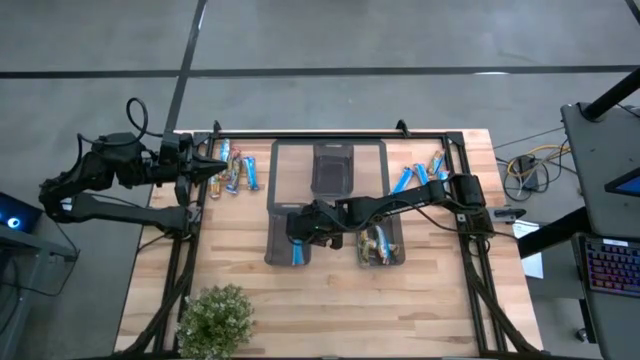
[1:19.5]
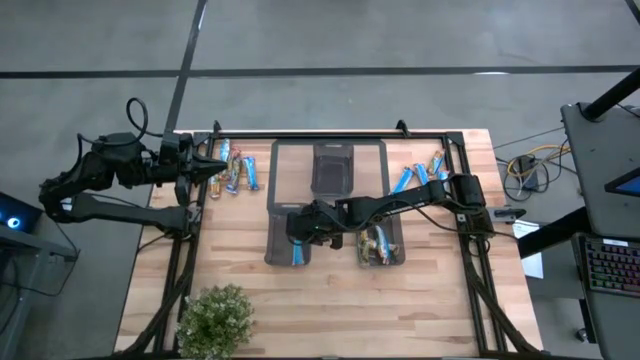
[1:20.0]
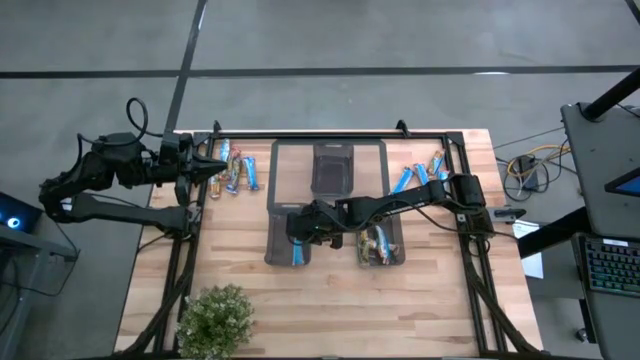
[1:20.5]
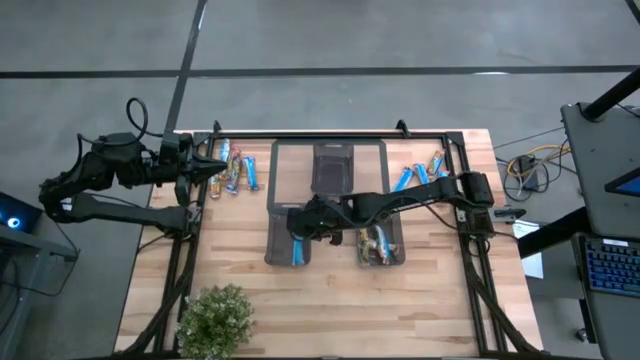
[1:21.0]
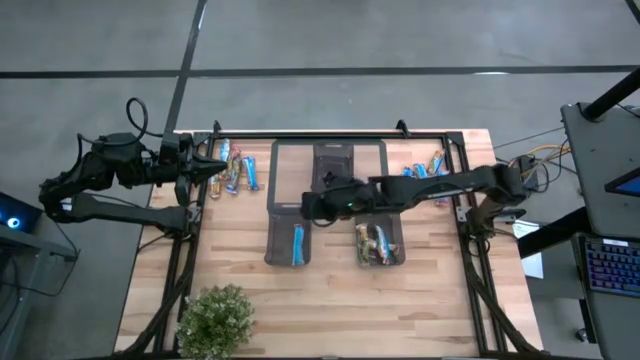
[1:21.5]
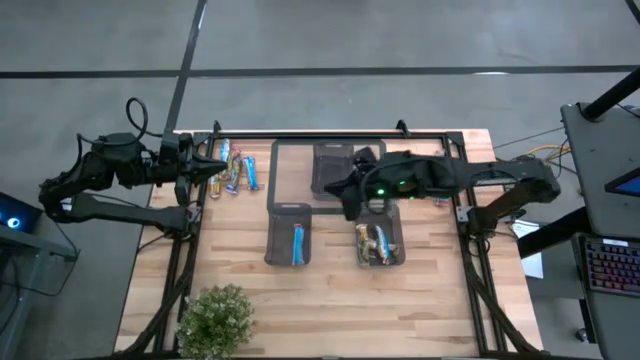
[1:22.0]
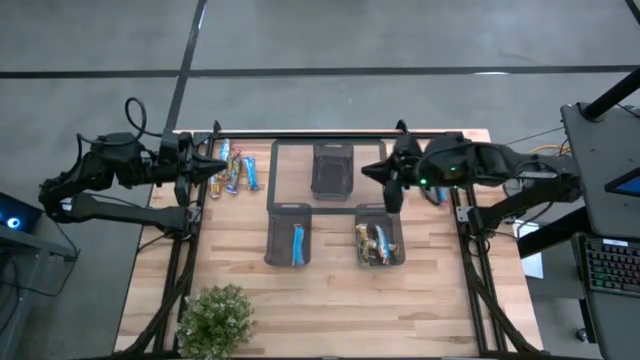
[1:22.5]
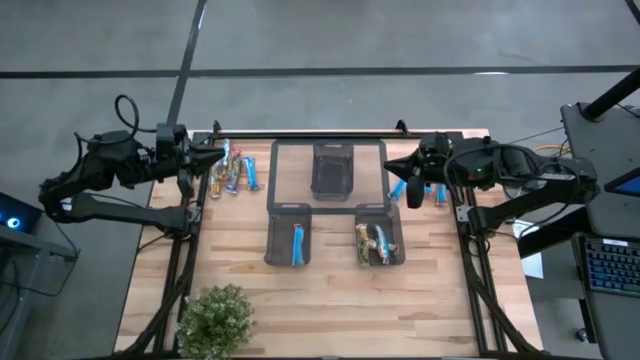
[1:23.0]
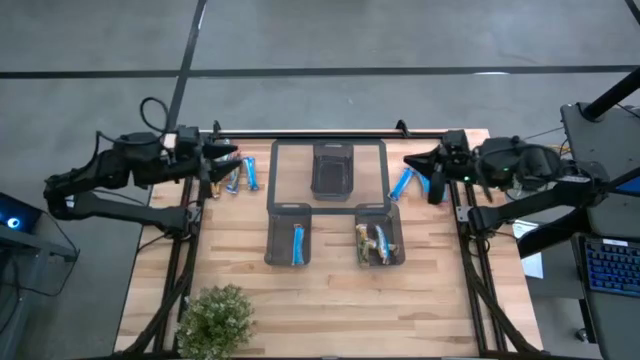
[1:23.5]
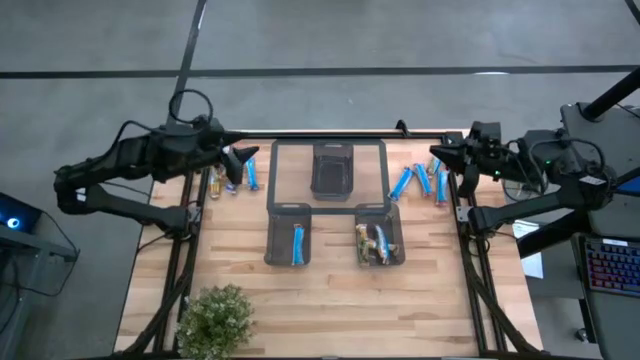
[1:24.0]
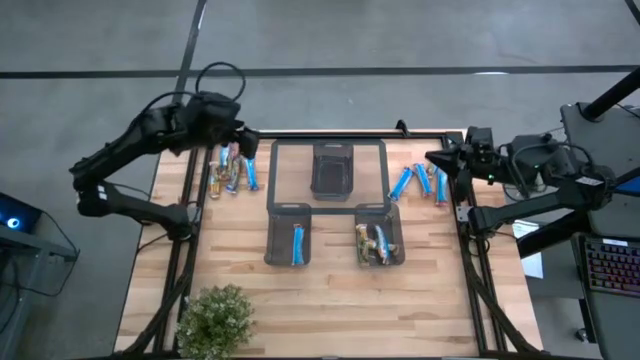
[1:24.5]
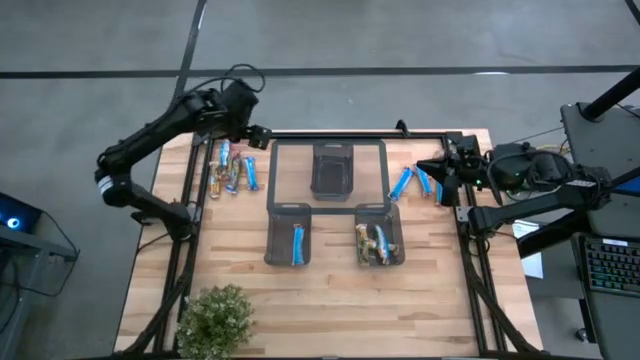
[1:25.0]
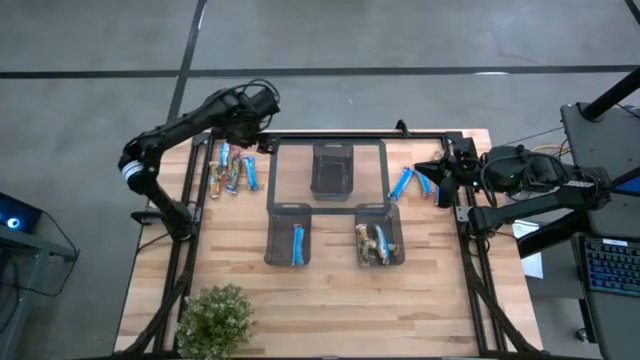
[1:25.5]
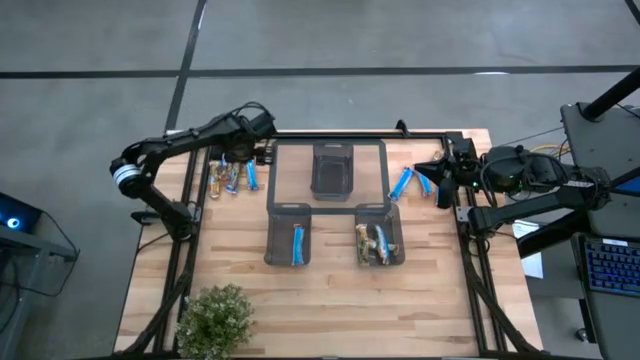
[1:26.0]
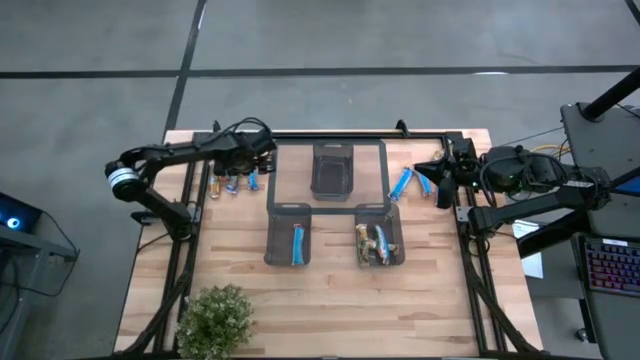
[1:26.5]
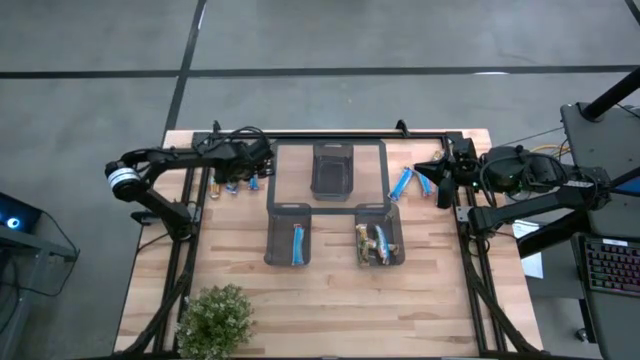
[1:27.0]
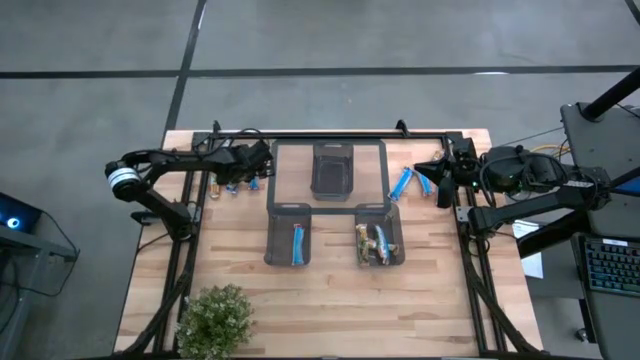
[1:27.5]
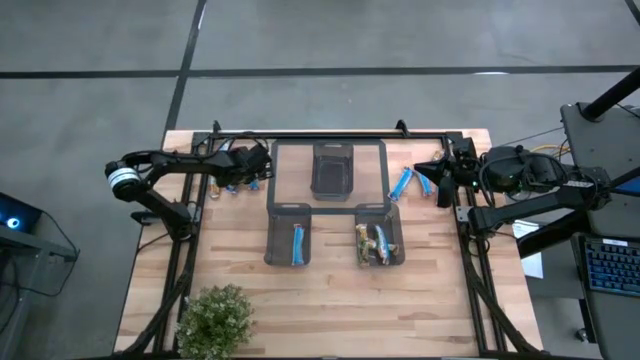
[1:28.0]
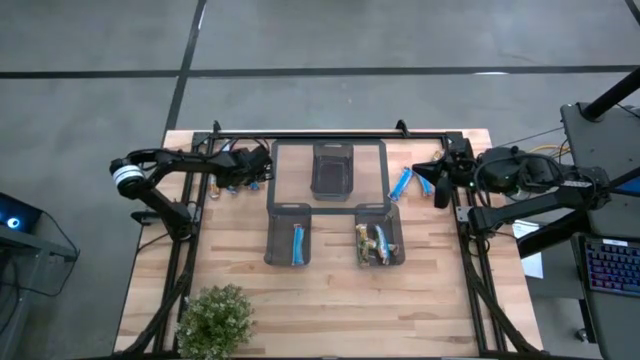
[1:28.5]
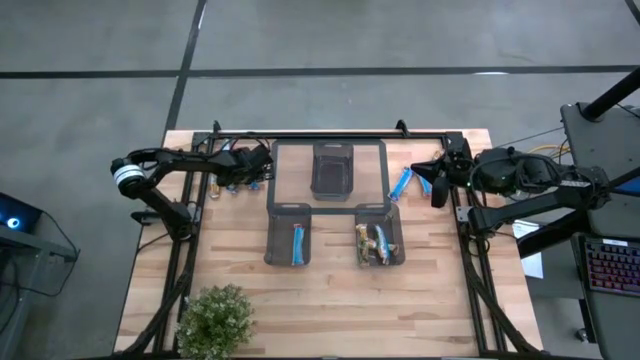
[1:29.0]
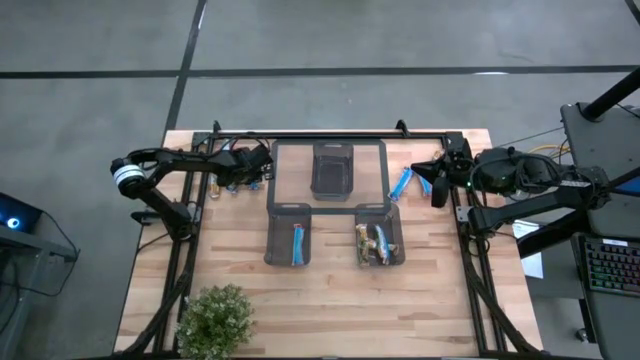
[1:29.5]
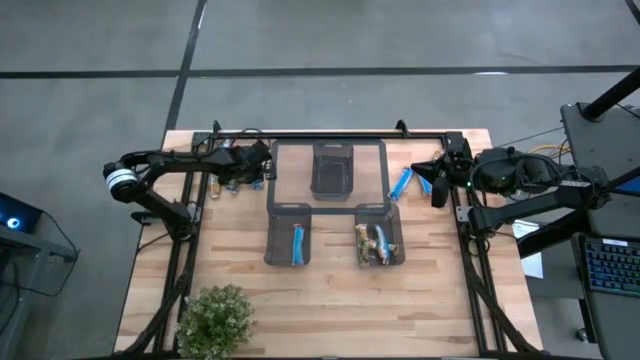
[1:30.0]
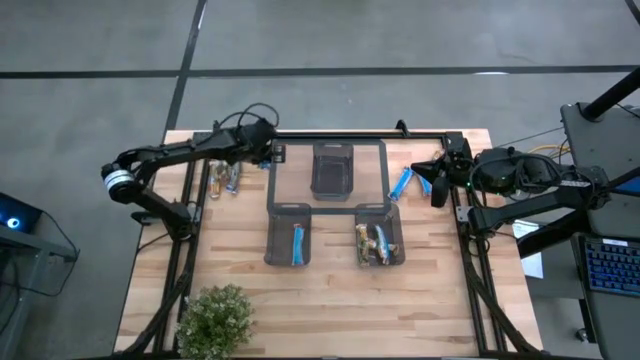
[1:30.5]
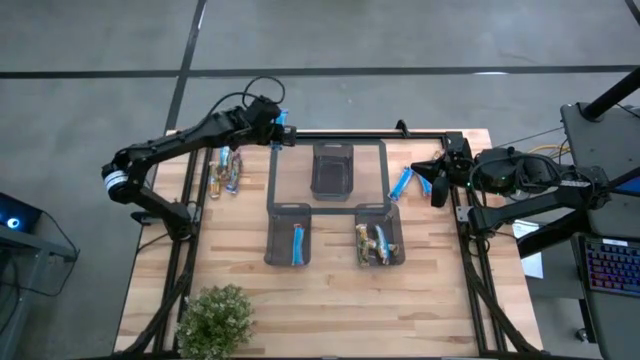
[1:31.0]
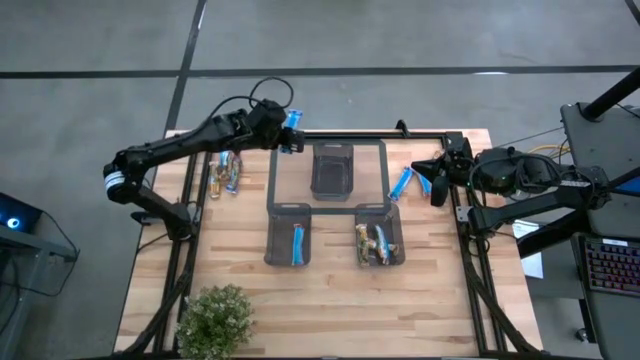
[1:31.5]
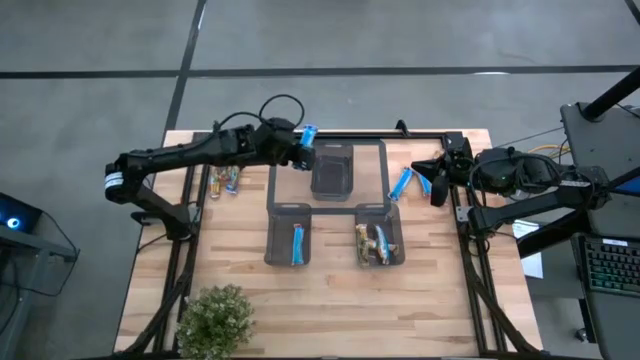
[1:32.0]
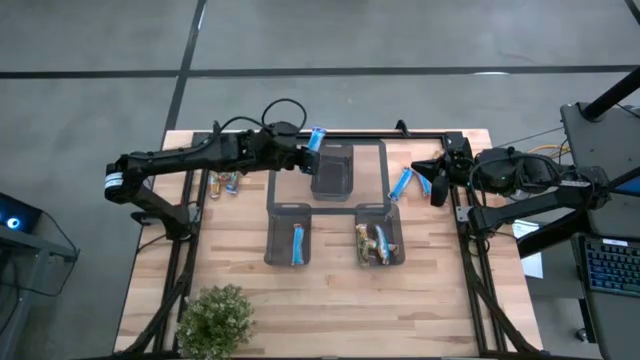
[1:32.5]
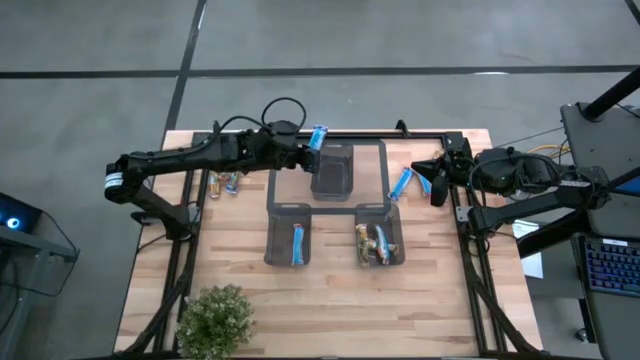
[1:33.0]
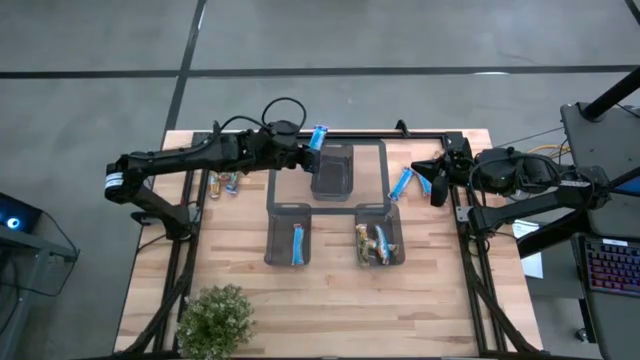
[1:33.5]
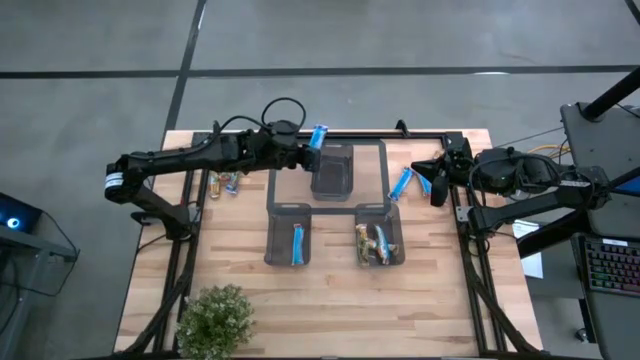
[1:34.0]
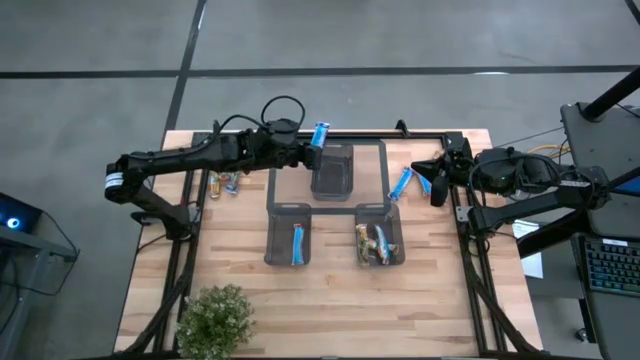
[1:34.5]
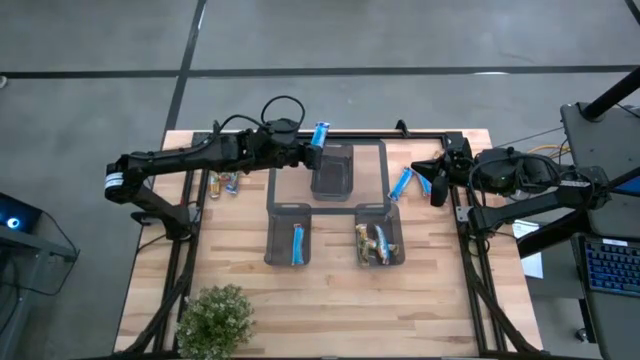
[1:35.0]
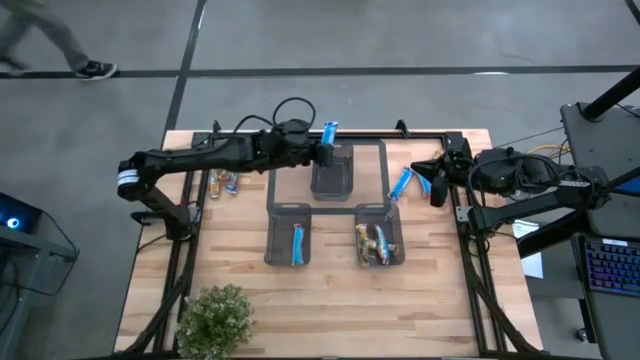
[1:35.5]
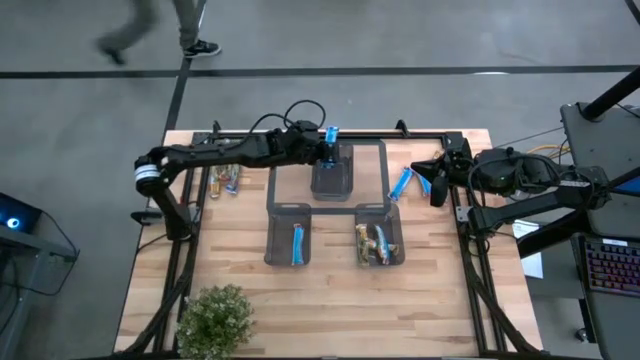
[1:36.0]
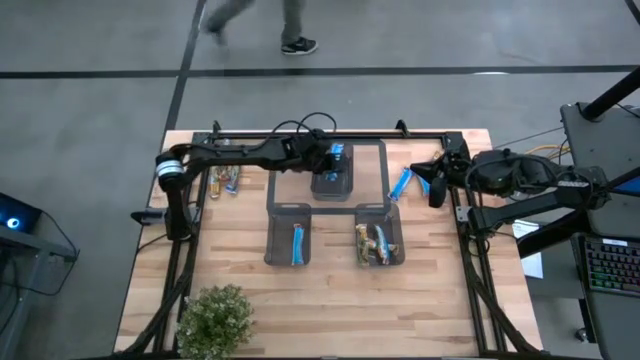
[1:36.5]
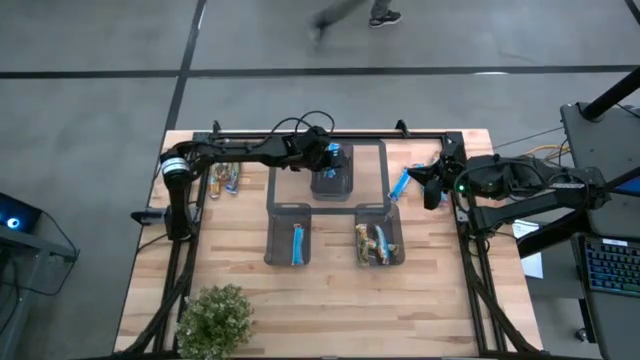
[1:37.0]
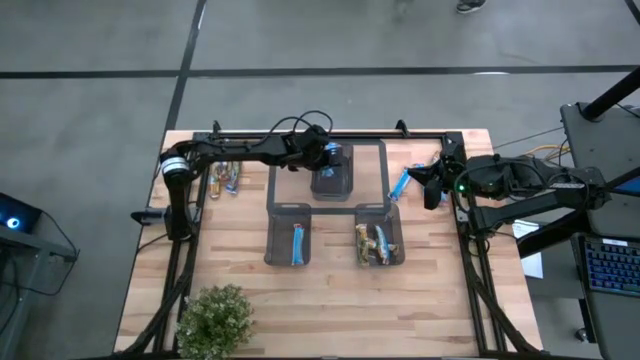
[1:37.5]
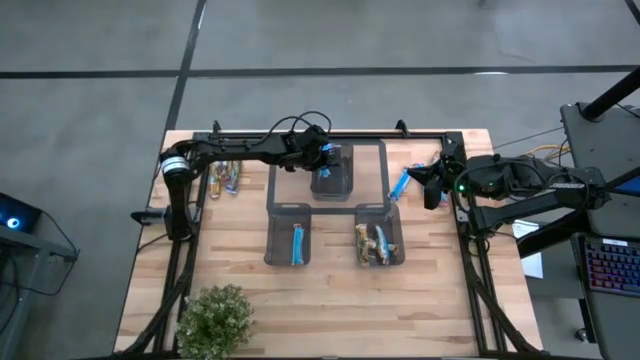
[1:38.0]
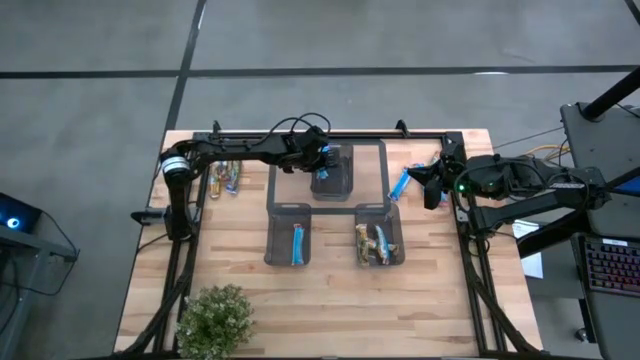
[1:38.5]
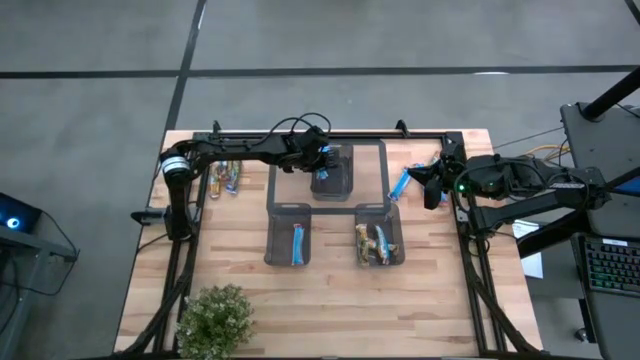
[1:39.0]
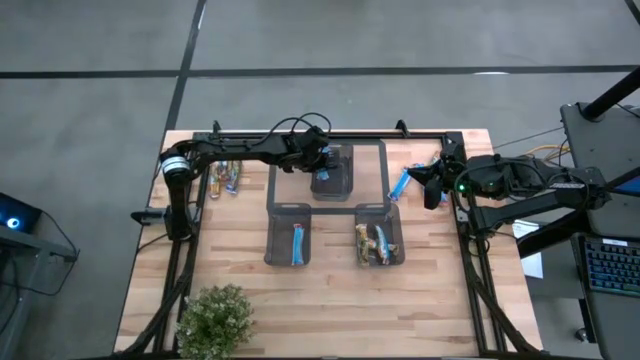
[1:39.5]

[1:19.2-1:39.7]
Task: Pick and place Granola Bars by type
Put the blue granola bar into the top black bin

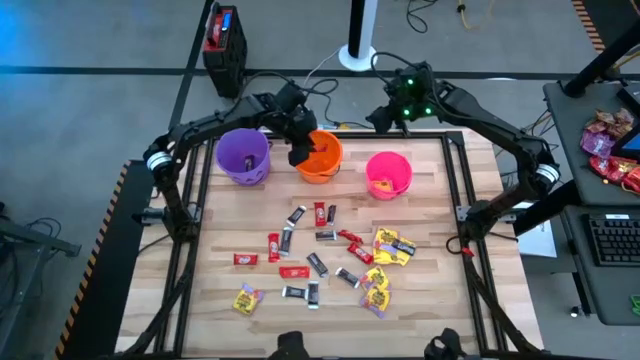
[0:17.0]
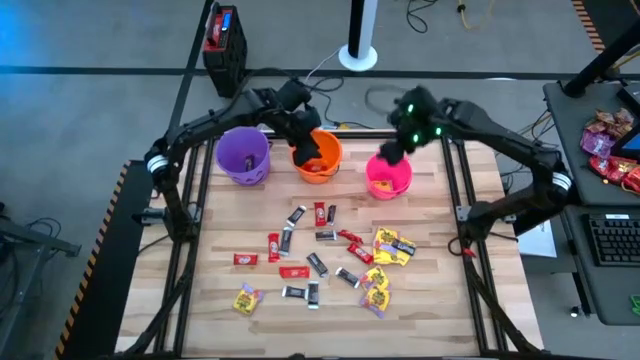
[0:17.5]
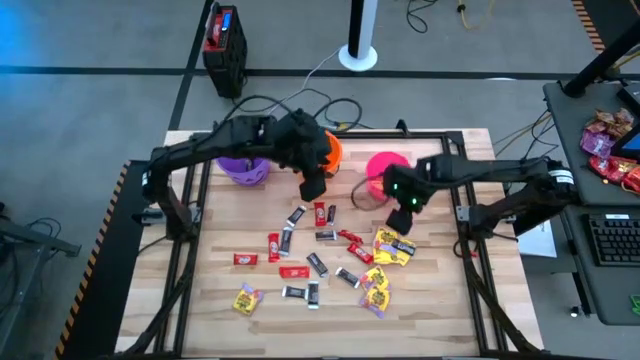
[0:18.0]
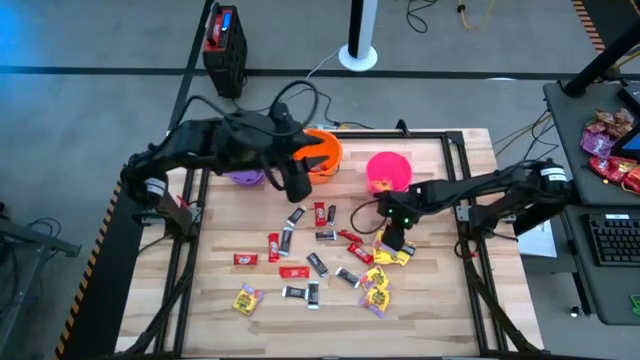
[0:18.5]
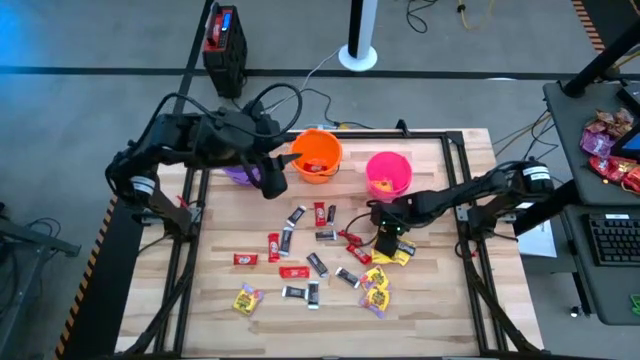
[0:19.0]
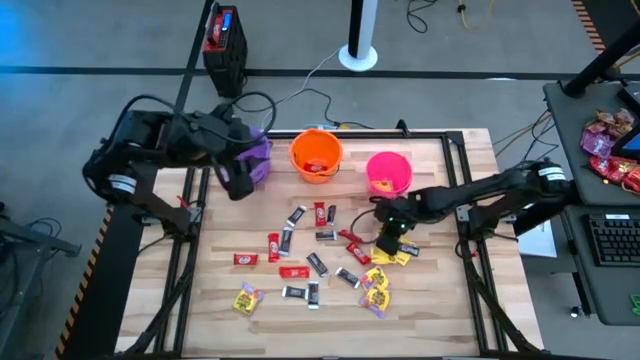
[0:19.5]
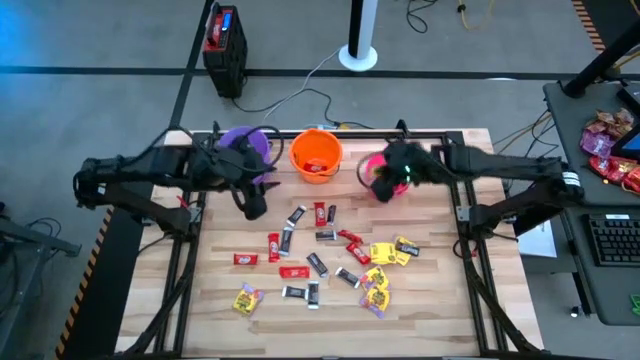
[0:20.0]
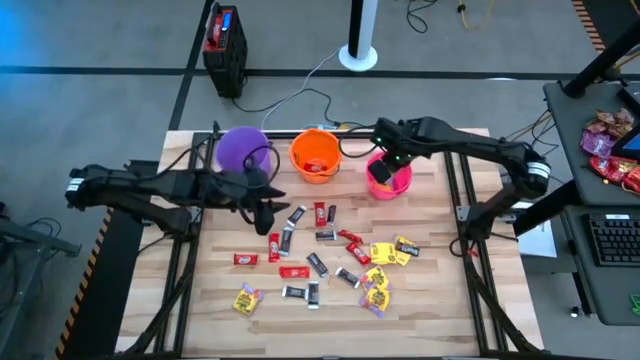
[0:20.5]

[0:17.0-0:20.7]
Task: Sort candy by brand, put in halloween buckets
Put the yellow candy into the pink bucket
